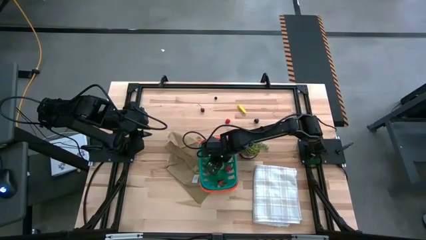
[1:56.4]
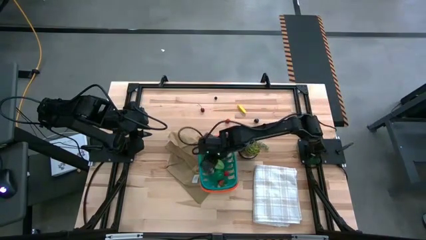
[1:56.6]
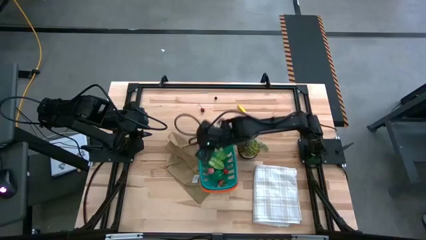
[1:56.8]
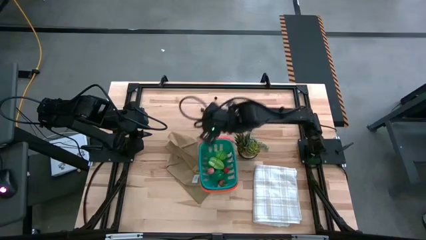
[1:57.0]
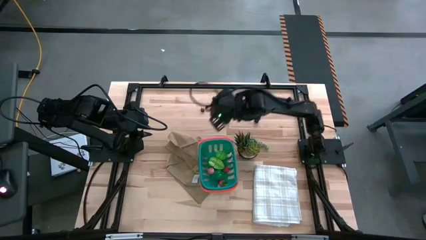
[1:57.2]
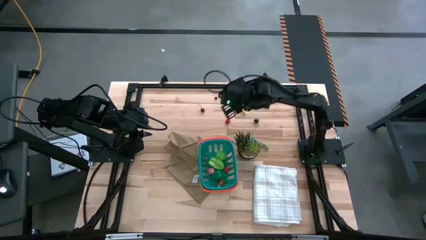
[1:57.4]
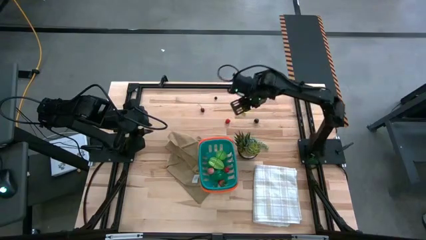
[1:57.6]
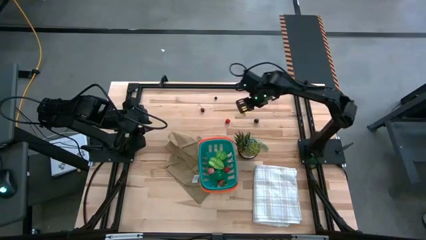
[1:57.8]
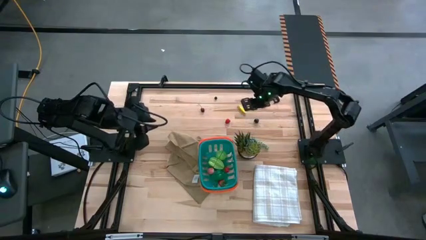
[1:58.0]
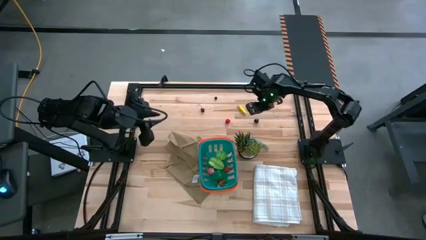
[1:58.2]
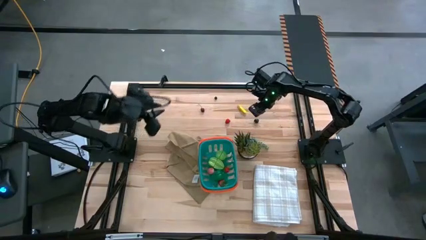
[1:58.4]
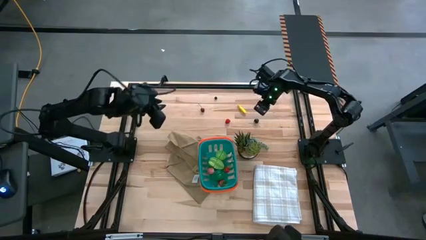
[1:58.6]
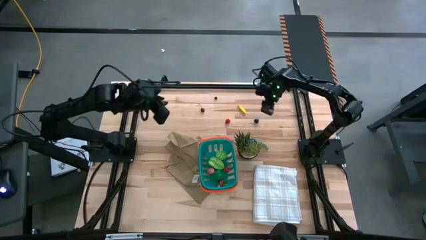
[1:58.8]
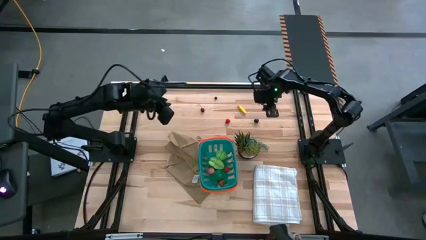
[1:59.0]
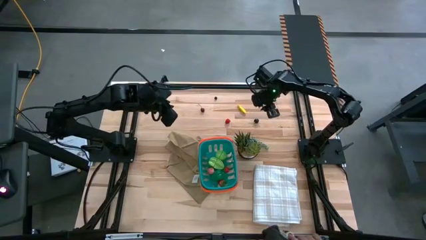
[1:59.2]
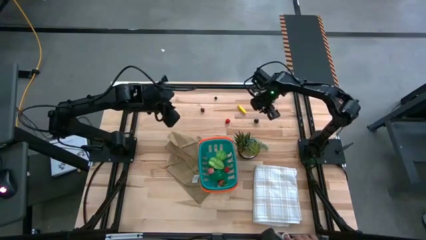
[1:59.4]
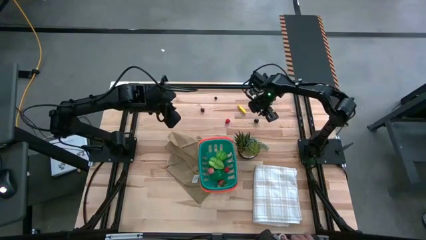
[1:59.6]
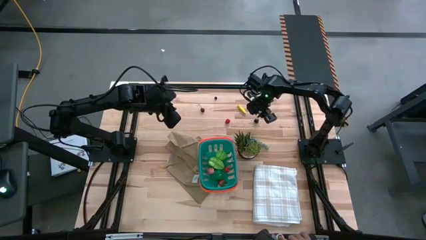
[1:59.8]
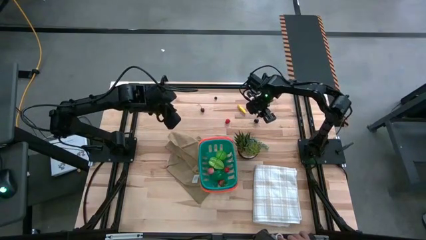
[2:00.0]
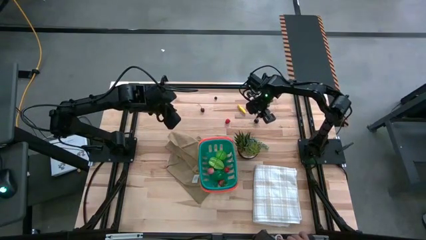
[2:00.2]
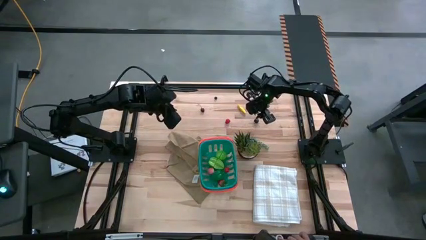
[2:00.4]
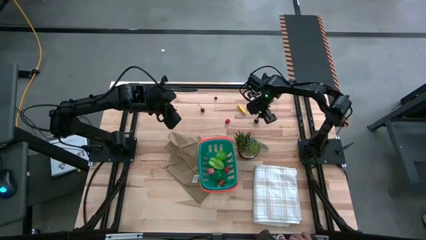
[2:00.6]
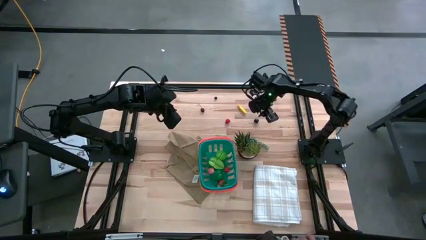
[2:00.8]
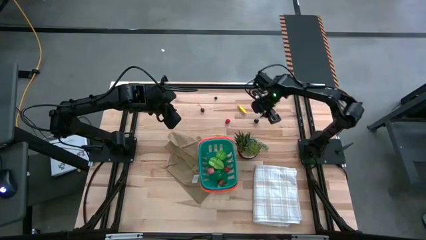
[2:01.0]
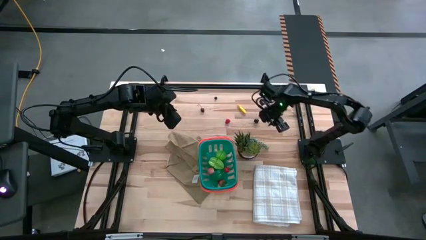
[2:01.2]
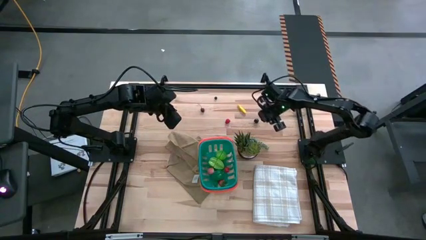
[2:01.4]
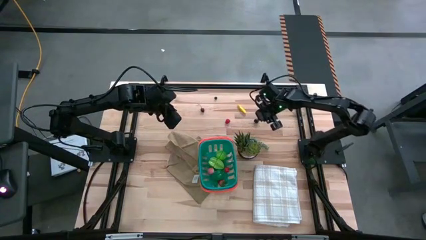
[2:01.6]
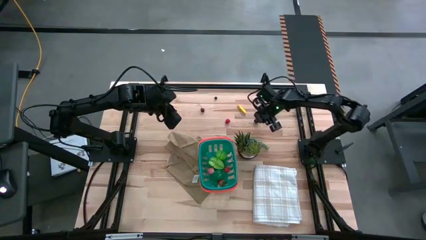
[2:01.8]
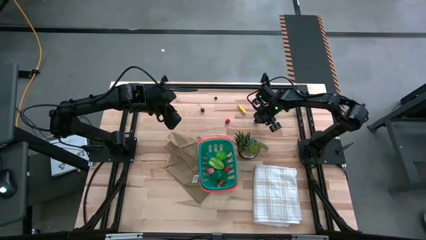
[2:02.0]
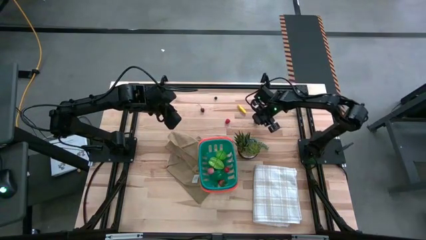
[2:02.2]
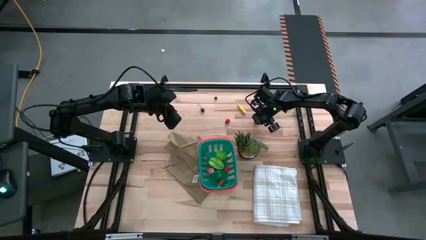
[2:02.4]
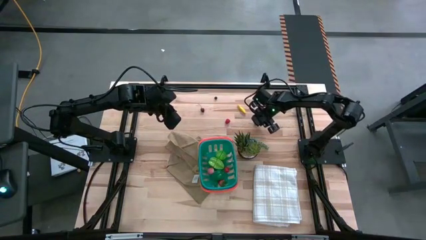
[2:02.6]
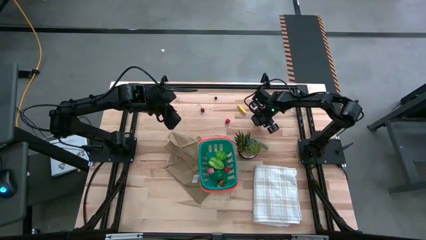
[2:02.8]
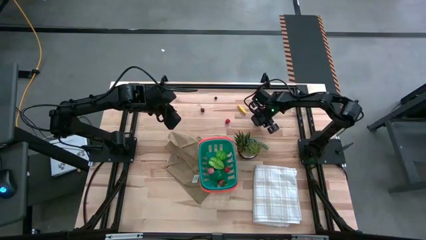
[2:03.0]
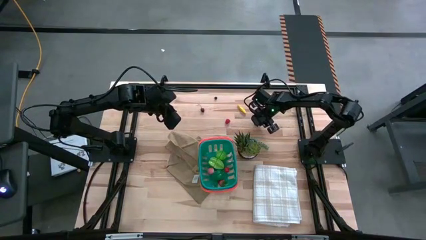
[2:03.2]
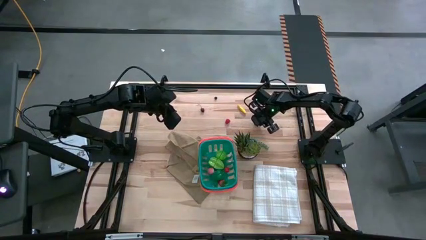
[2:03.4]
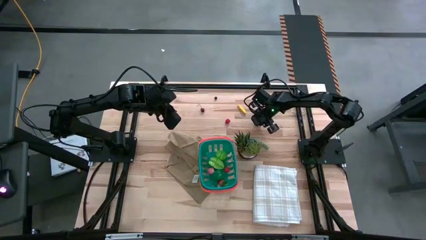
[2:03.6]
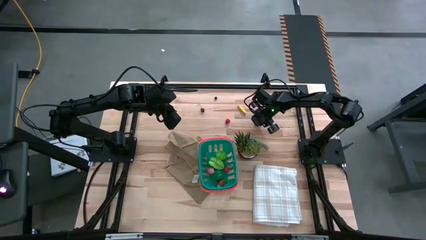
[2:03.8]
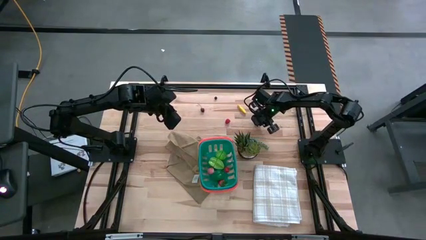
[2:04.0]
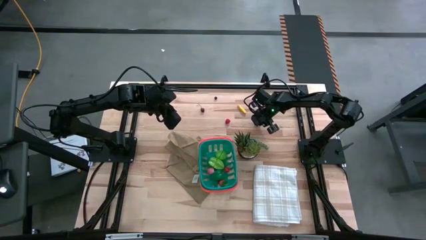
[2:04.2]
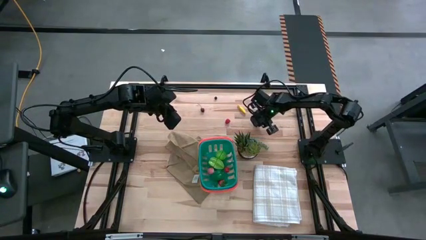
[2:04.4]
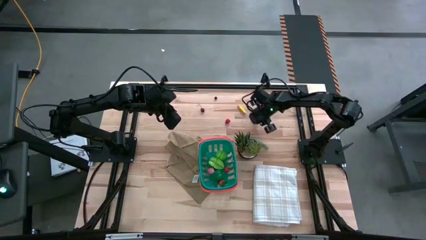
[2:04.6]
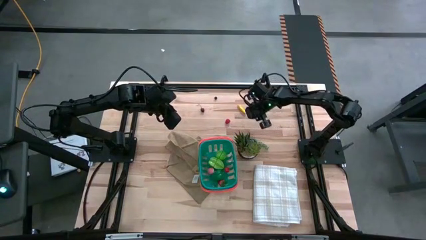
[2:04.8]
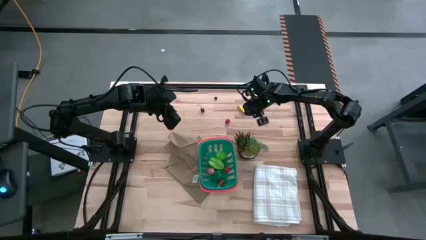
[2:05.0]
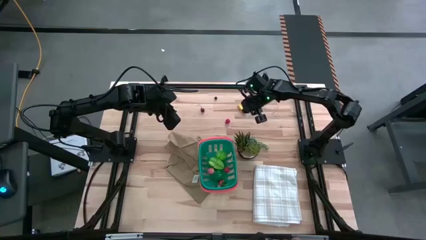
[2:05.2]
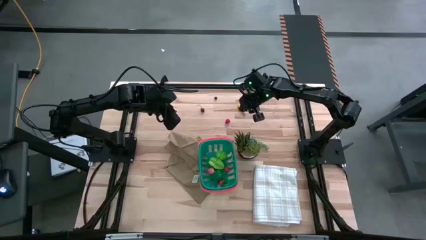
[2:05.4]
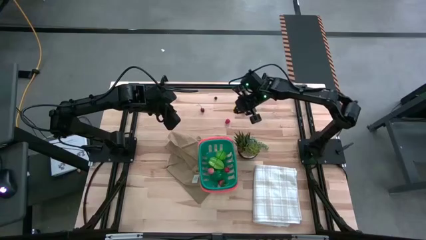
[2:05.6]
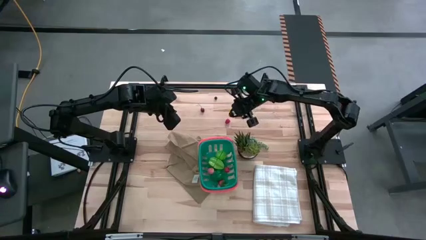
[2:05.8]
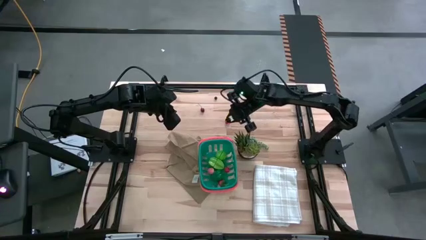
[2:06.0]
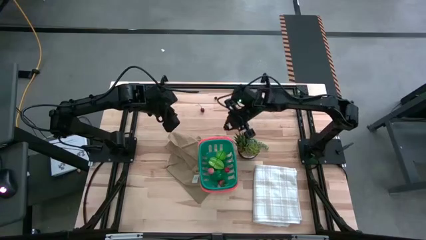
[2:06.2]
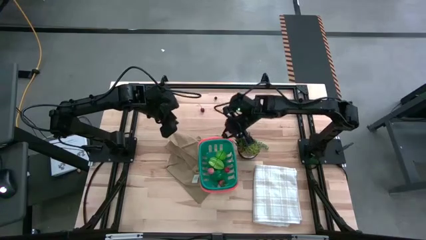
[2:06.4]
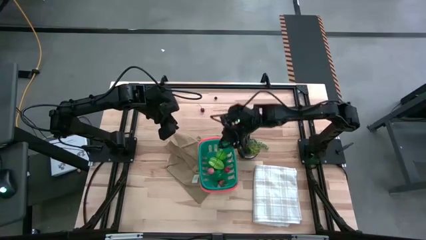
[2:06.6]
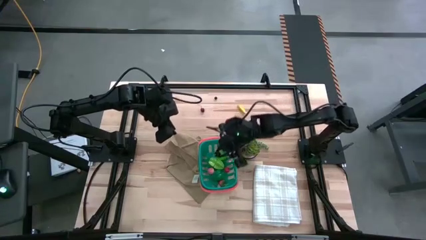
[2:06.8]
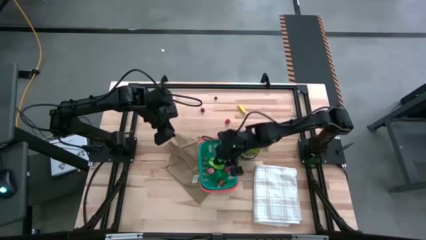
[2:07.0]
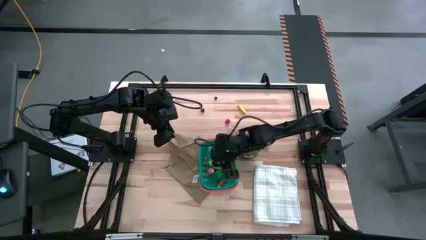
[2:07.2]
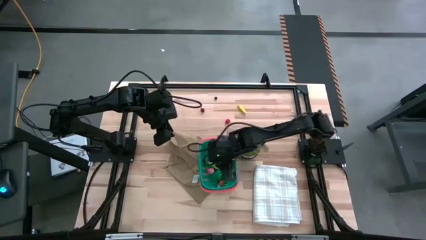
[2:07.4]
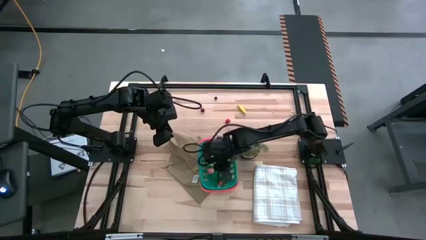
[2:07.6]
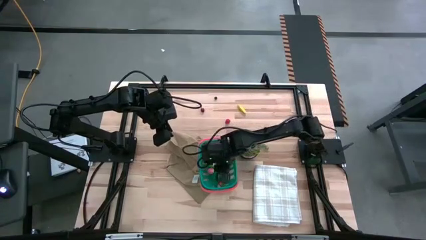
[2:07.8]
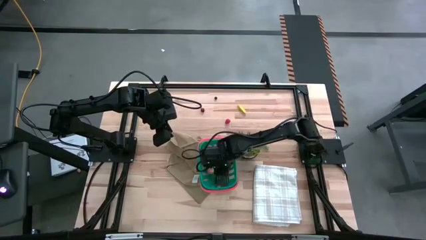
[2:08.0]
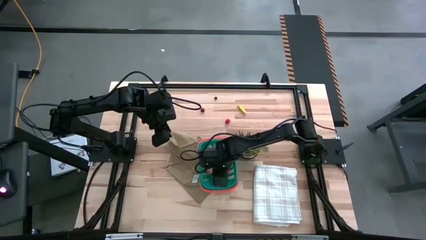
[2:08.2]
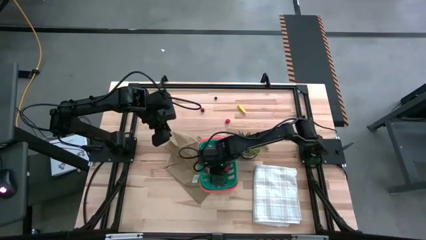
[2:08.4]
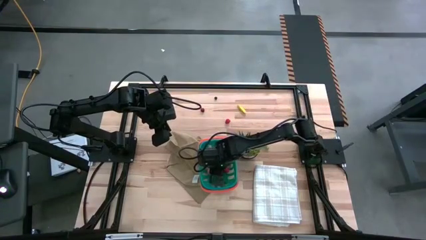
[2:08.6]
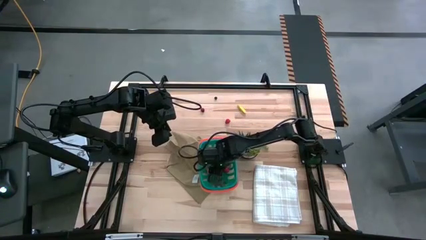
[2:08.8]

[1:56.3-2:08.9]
Task: Pick and placing Produce into tupperware
Put the black cherry into the green basket
